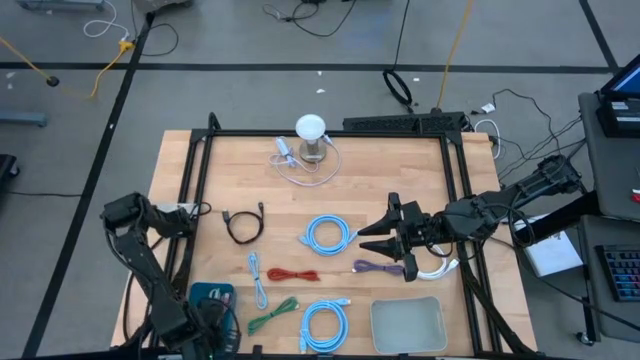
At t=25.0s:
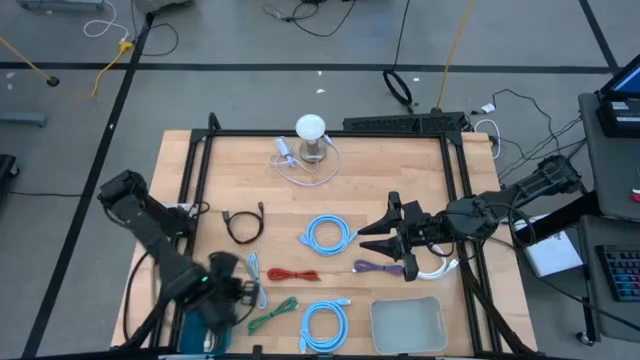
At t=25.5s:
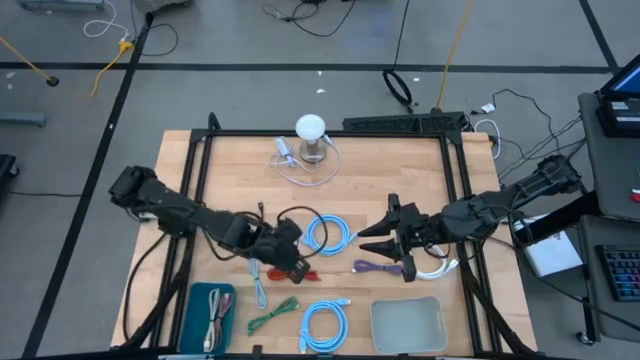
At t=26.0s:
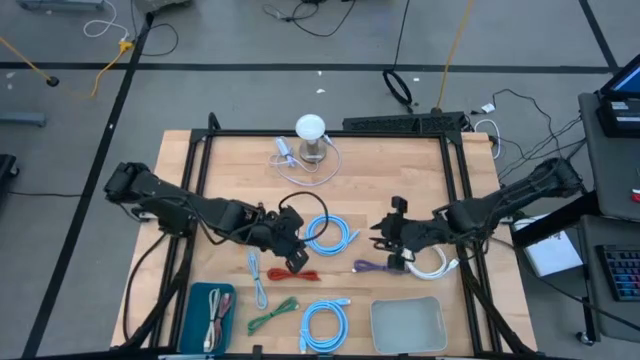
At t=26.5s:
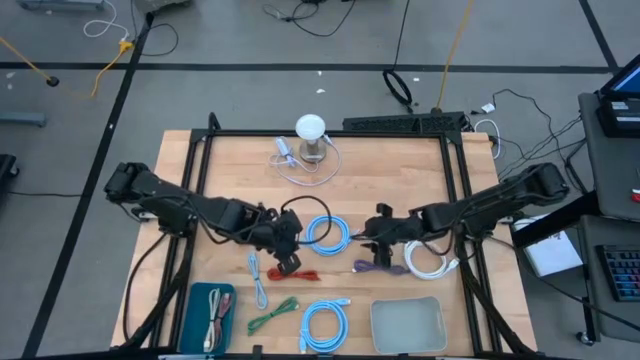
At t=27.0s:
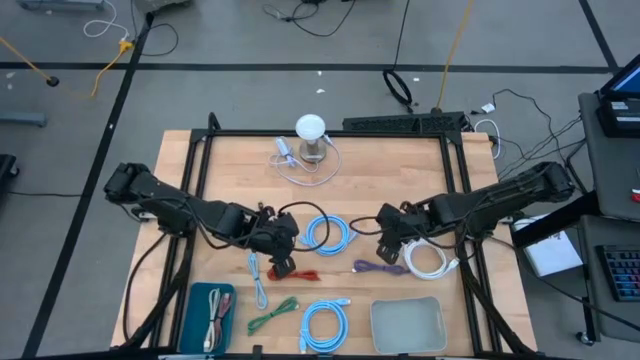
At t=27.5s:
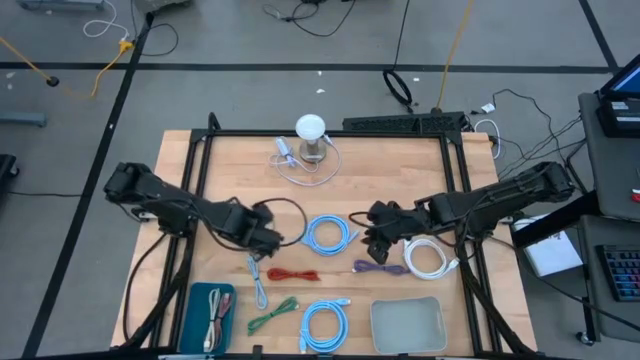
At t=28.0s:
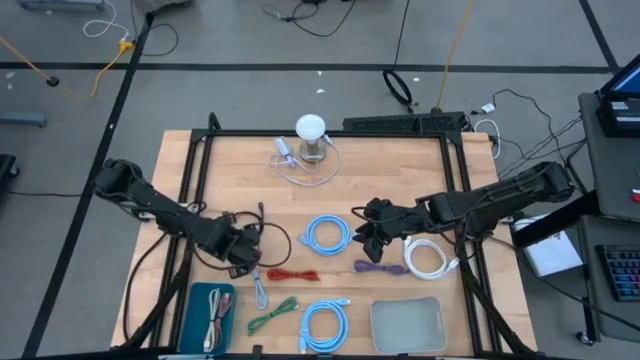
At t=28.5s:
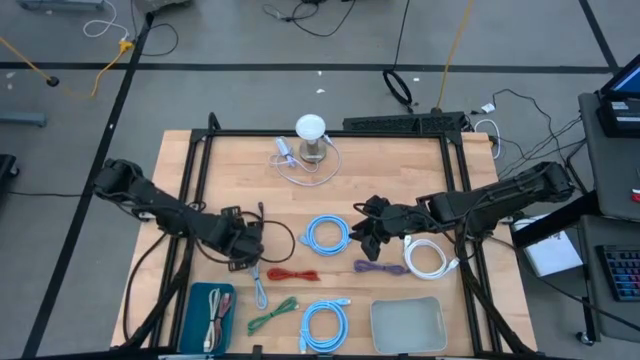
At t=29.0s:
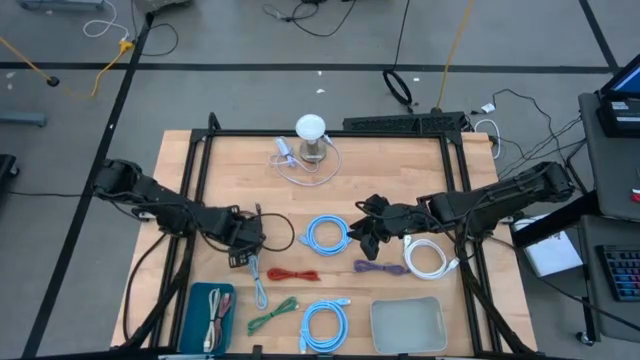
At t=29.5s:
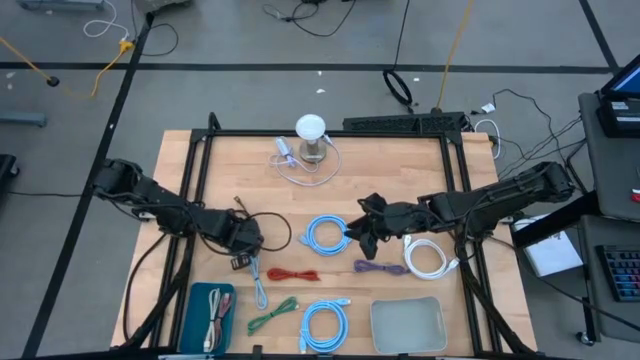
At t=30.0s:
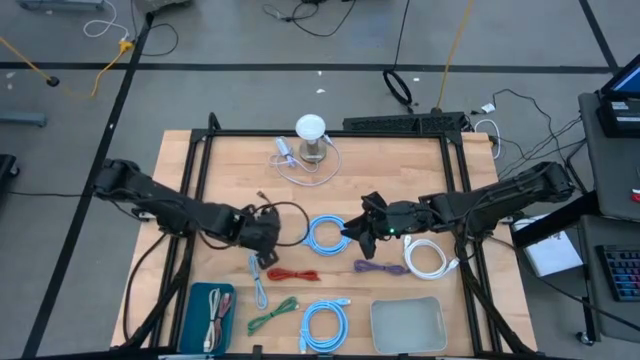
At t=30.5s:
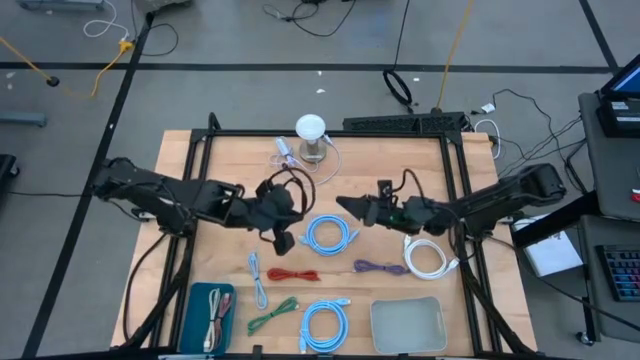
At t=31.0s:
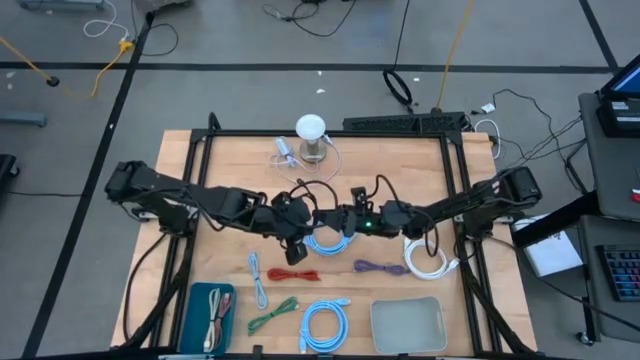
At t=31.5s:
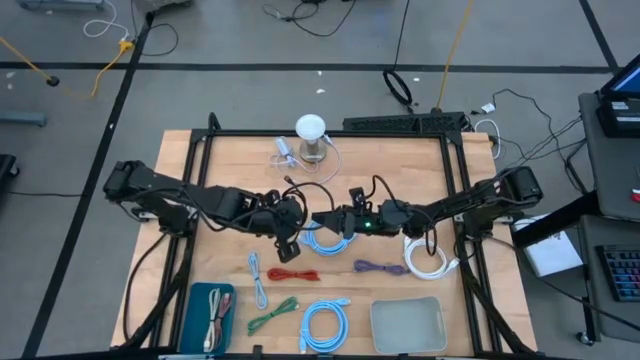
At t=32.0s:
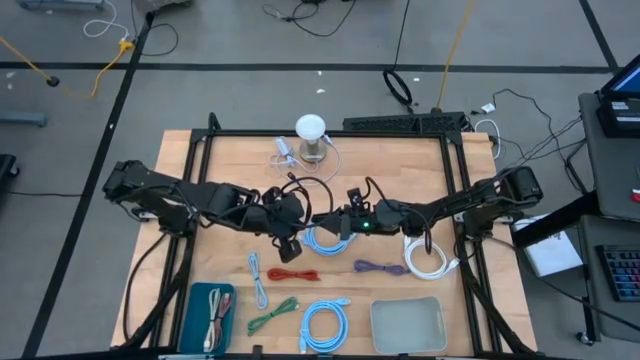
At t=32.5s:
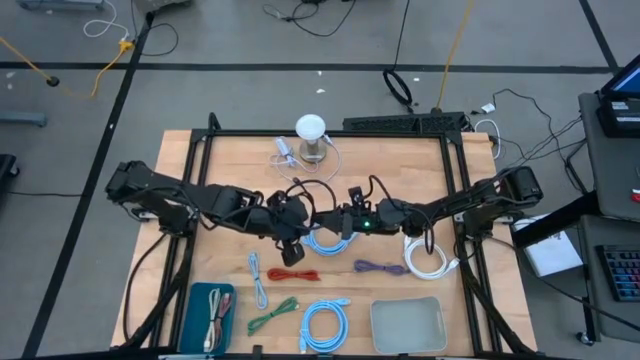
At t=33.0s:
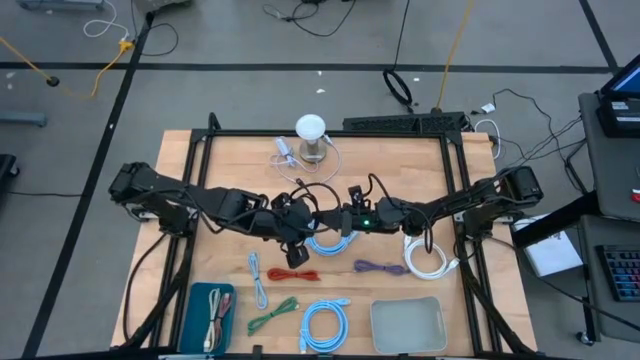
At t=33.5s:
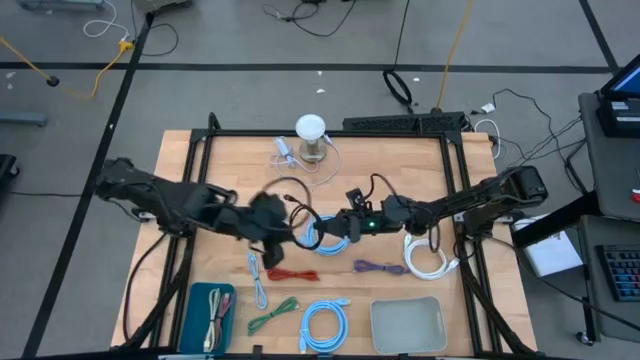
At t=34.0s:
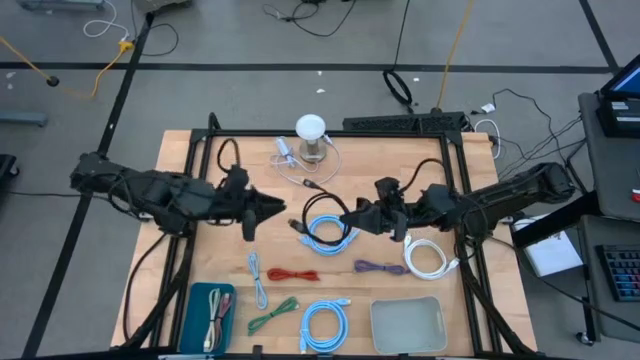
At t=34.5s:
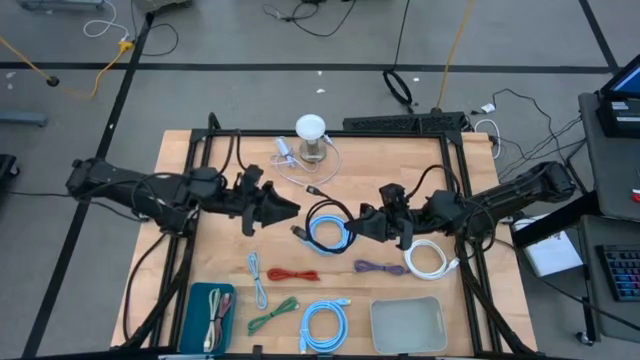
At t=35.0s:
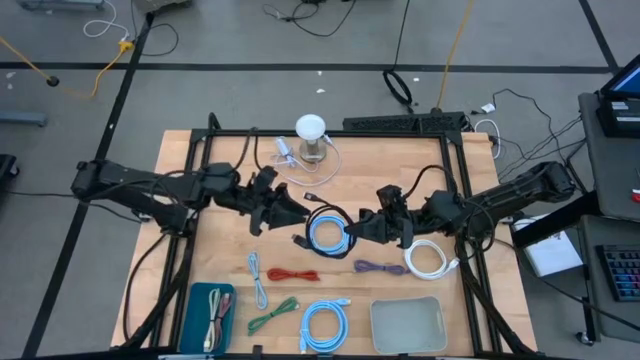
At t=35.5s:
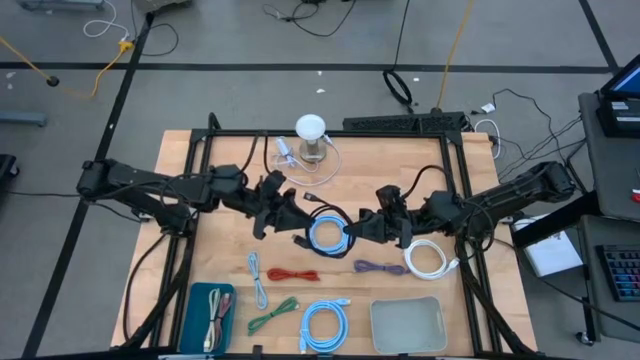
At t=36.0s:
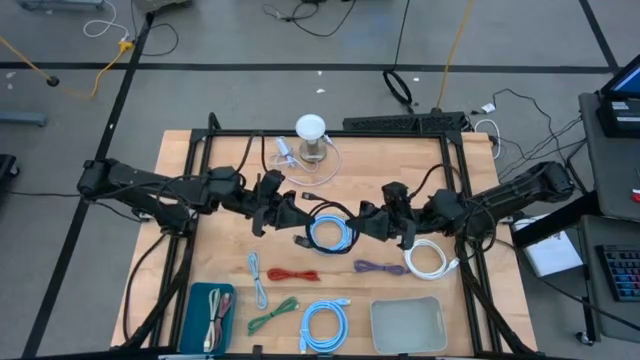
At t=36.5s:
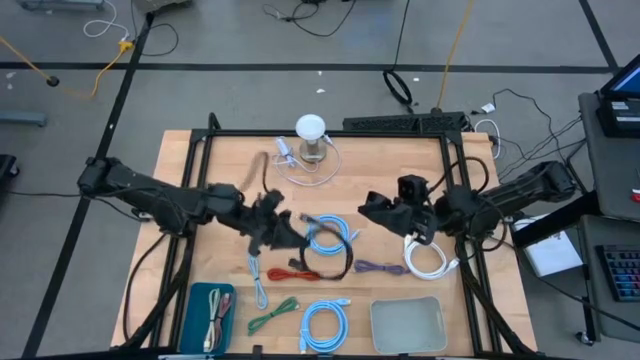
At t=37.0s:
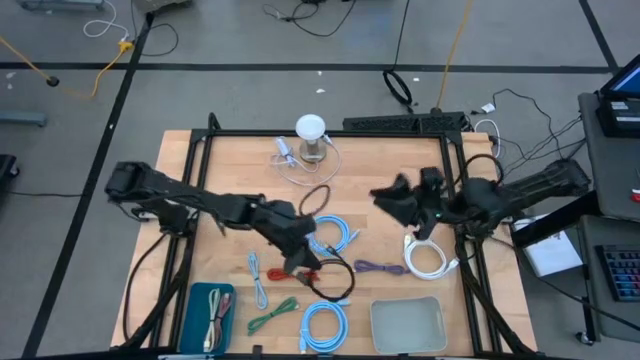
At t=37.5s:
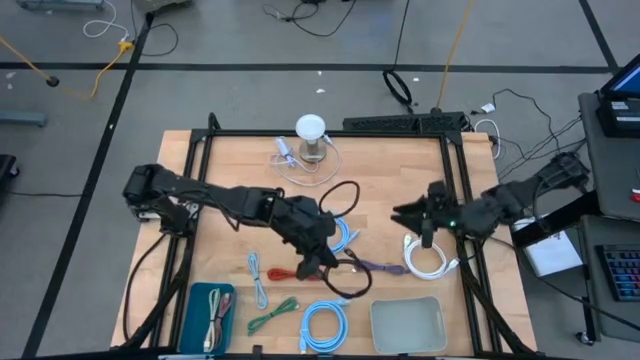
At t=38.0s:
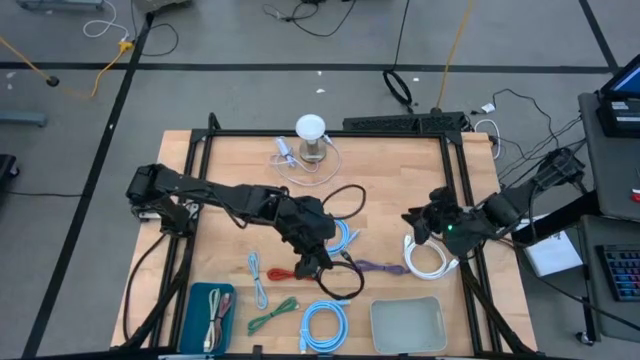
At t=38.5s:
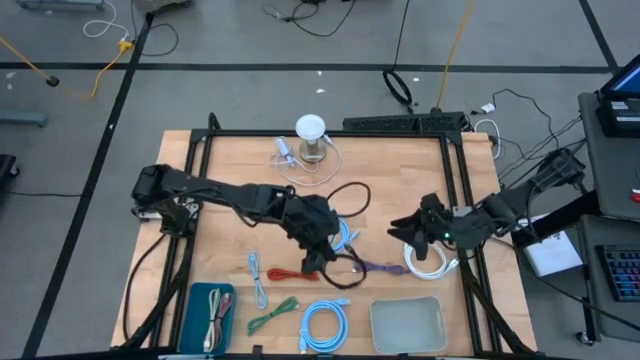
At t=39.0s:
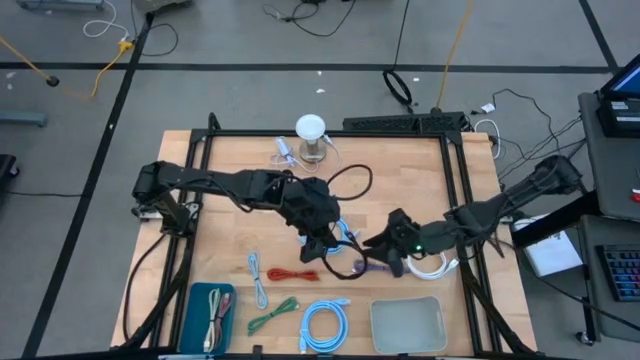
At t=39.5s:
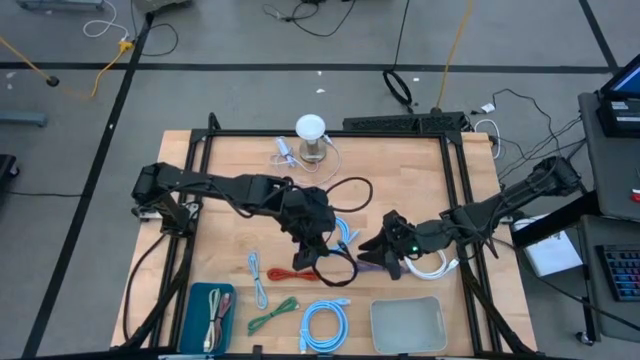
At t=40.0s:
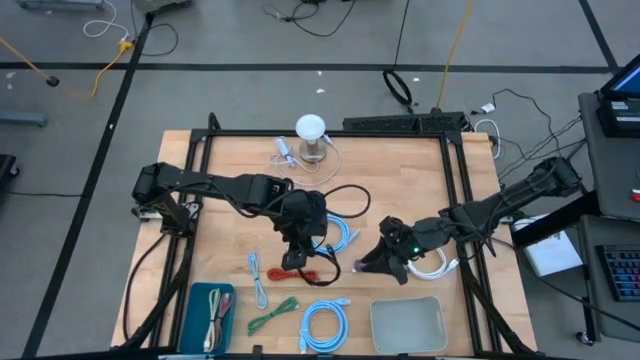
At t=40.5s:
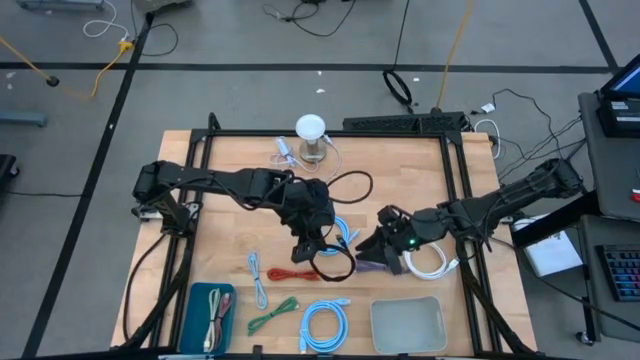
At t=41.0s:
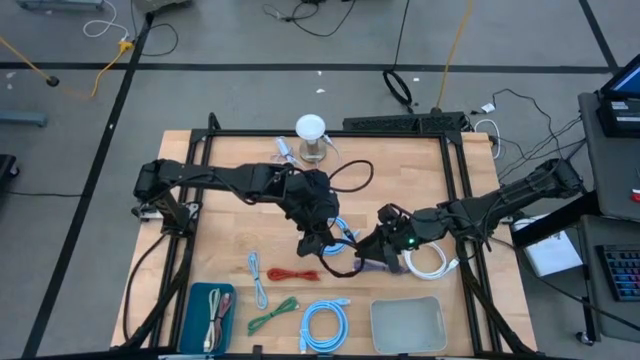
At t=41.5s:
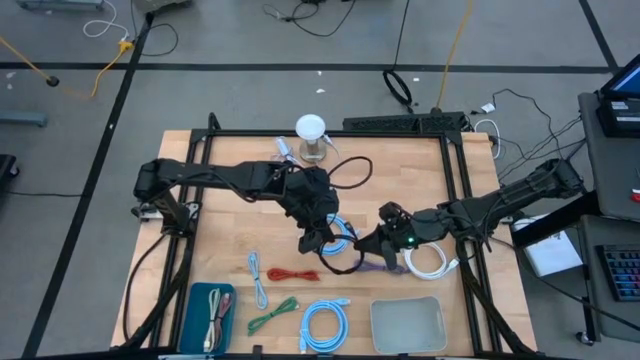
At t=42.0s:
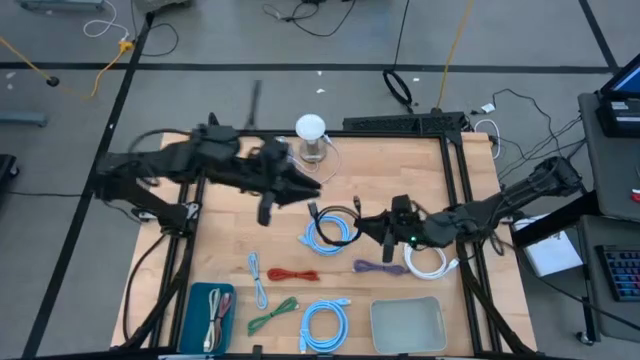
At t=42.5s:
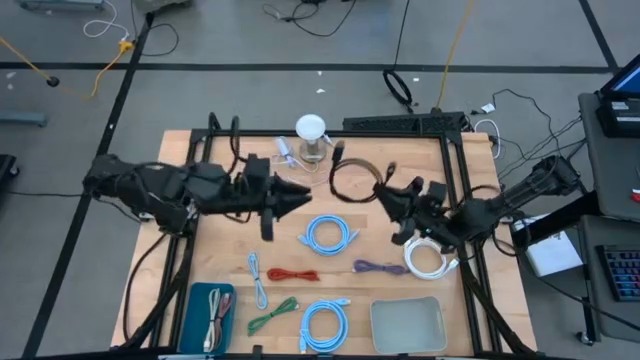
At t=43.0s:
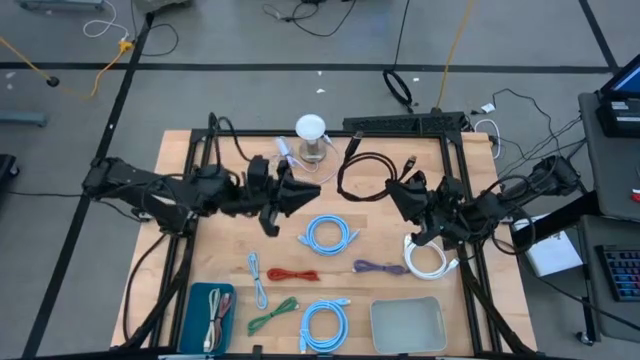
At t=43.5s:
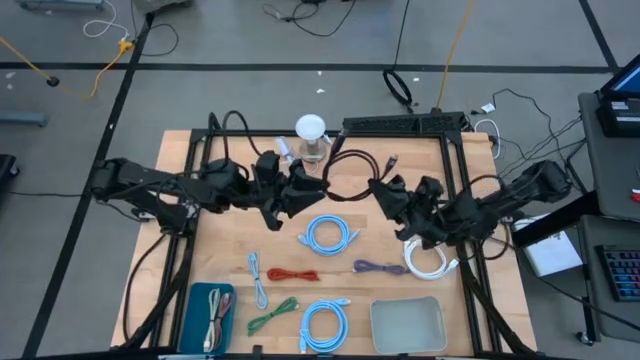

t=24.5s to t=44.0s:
Task: Pick & Place USB Port
Put the black video cable into the gray bin
